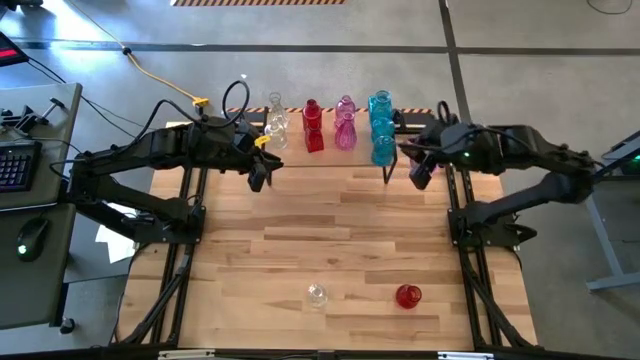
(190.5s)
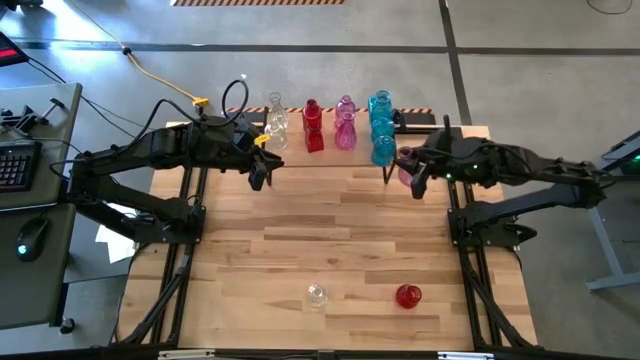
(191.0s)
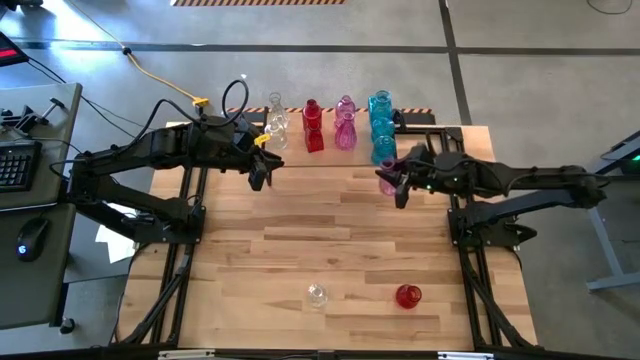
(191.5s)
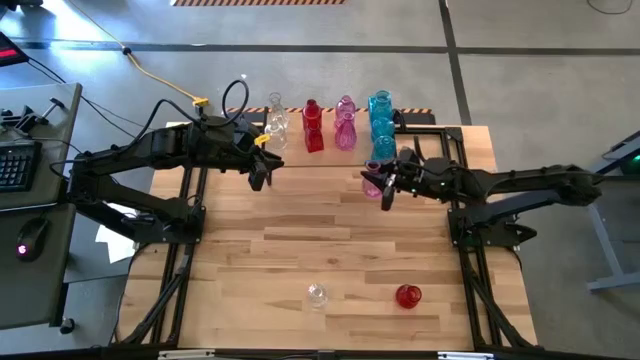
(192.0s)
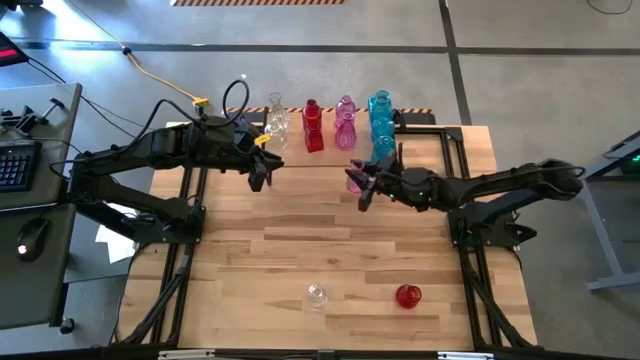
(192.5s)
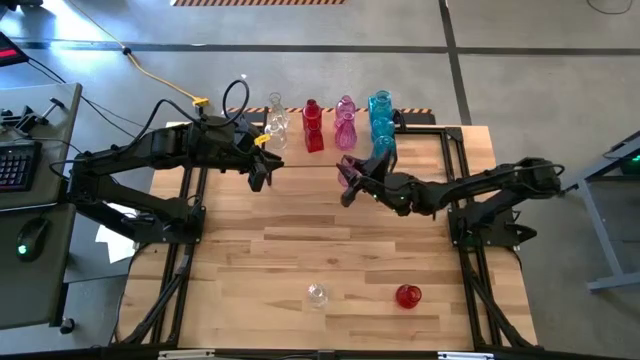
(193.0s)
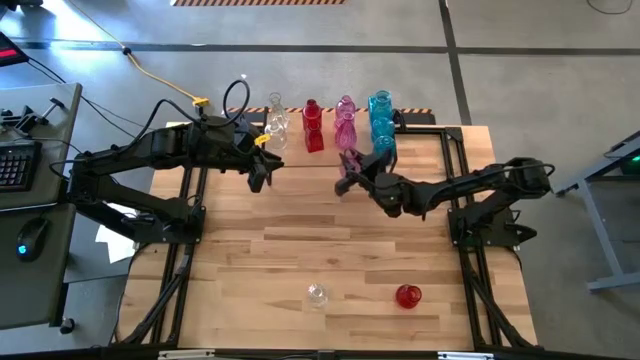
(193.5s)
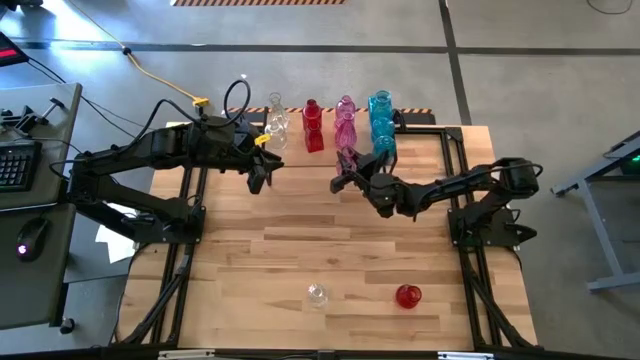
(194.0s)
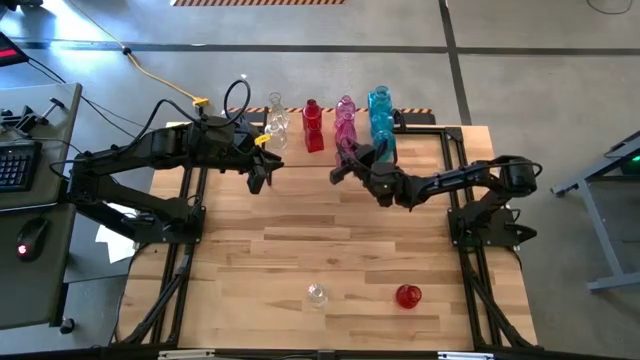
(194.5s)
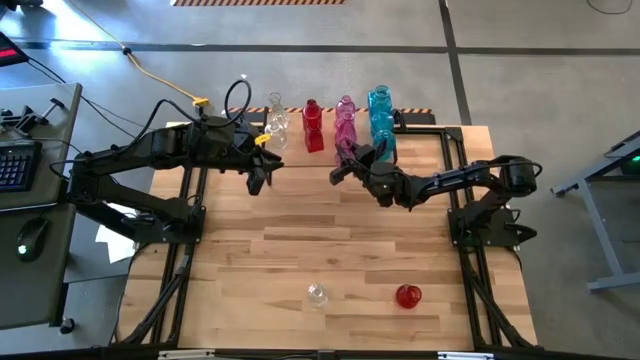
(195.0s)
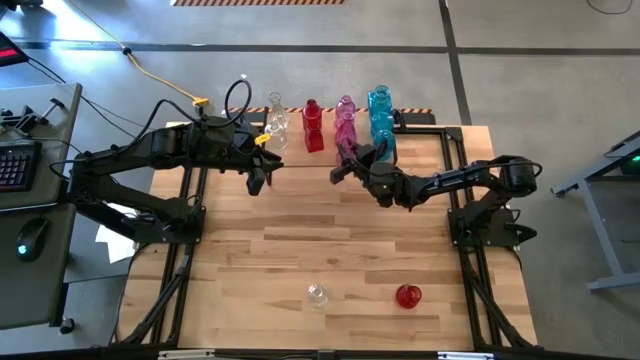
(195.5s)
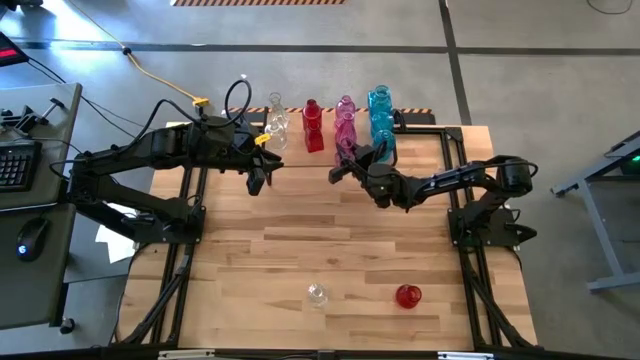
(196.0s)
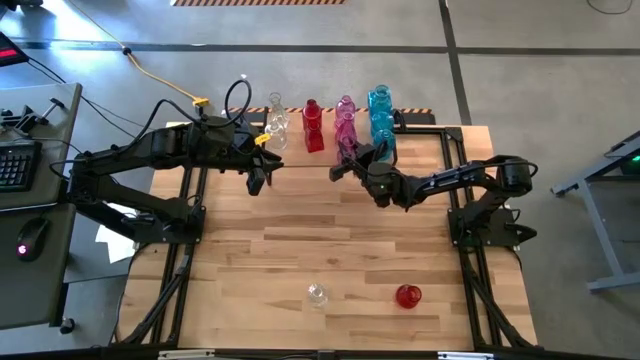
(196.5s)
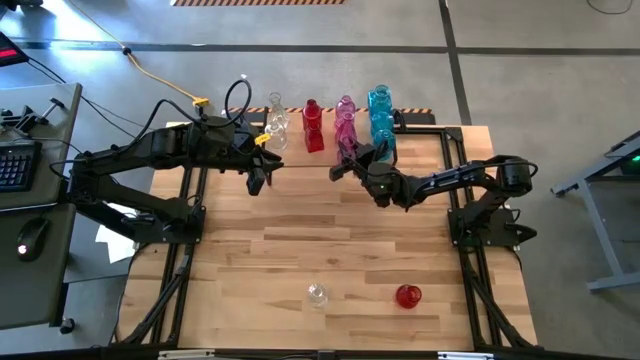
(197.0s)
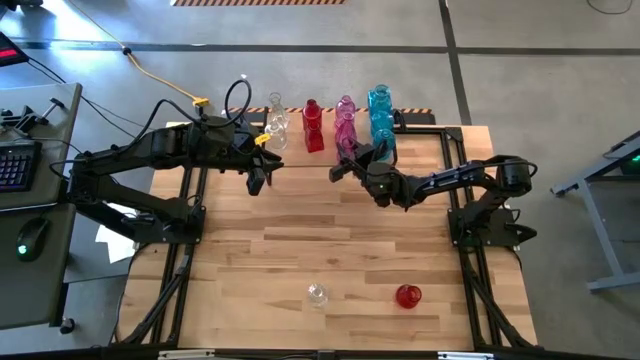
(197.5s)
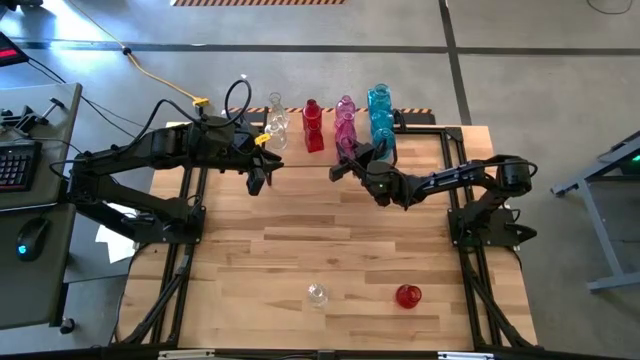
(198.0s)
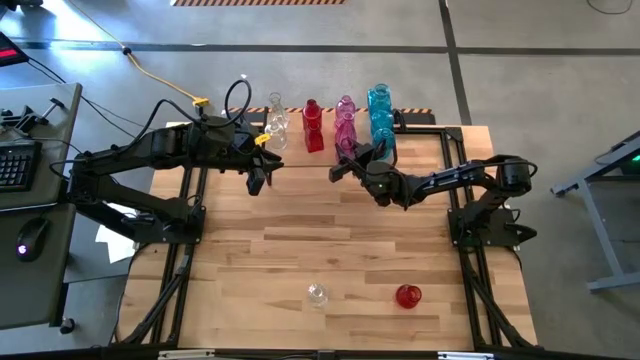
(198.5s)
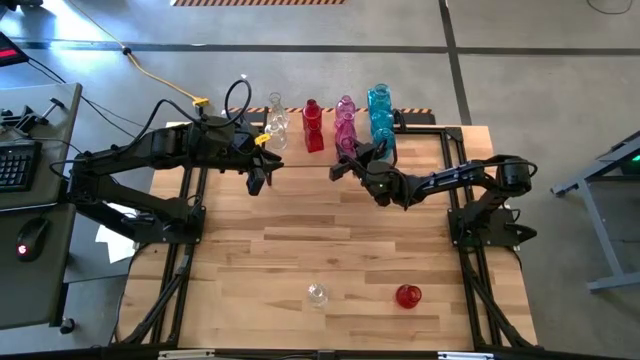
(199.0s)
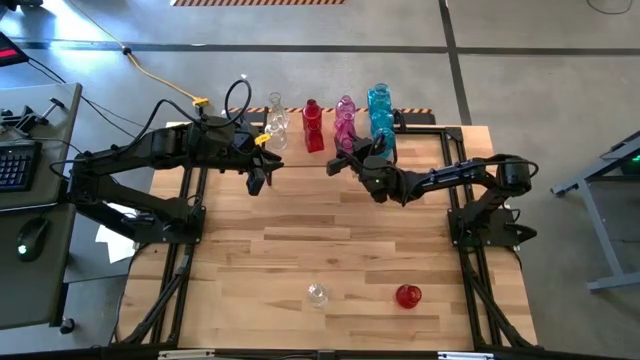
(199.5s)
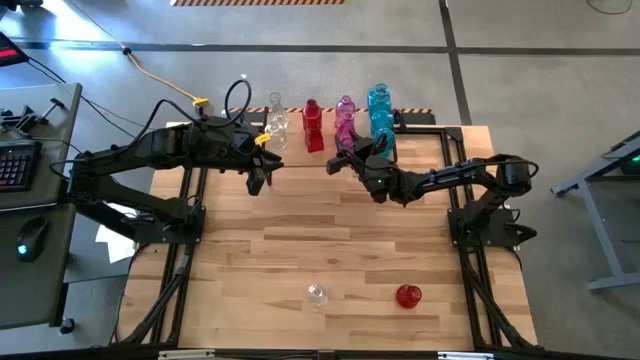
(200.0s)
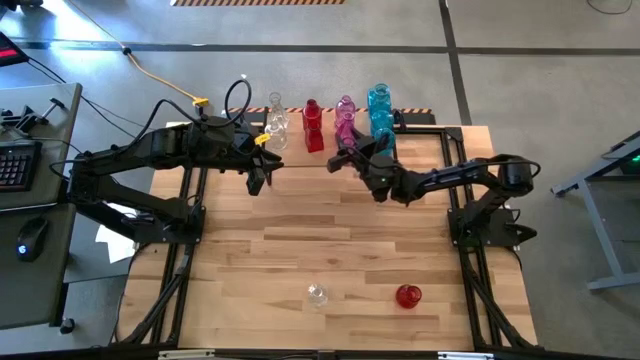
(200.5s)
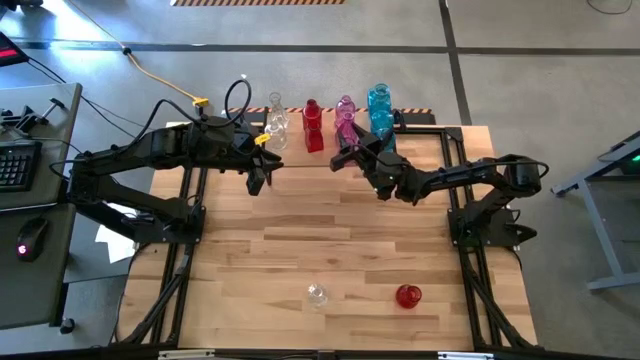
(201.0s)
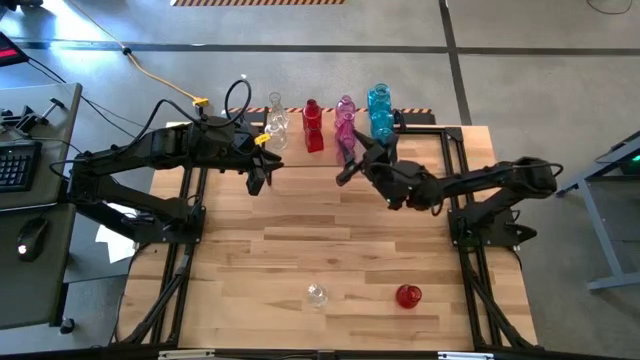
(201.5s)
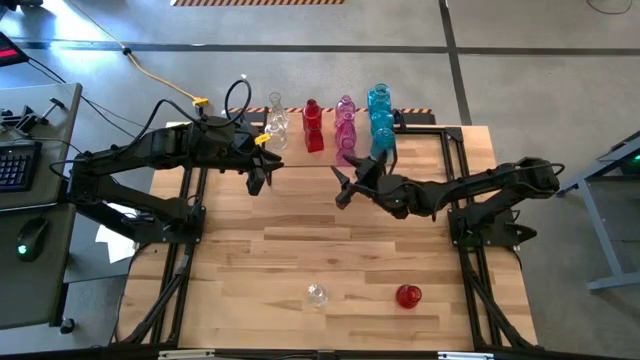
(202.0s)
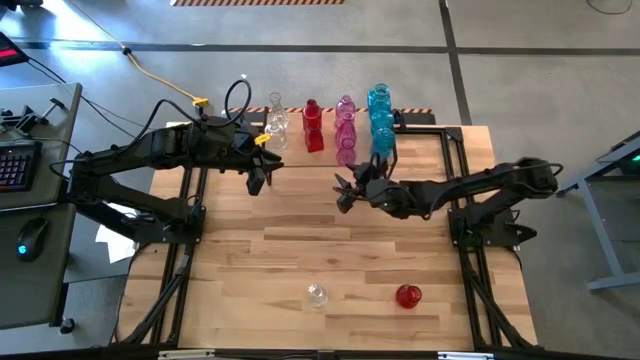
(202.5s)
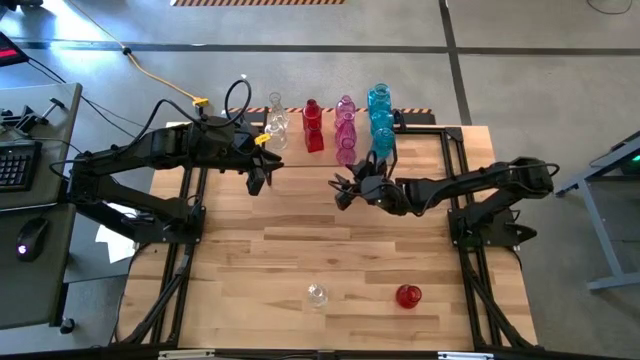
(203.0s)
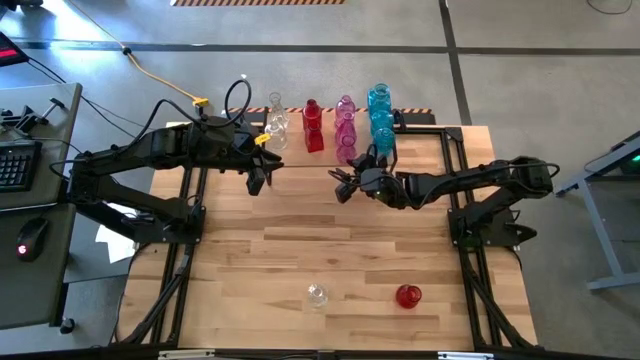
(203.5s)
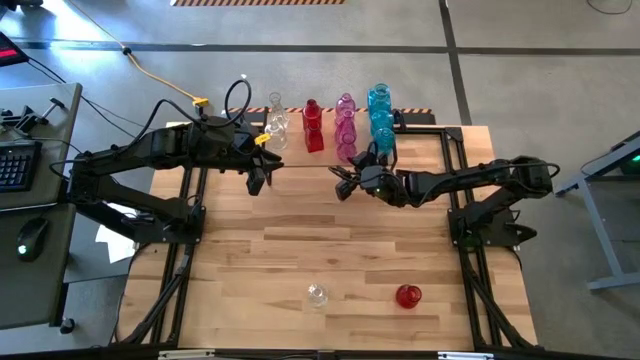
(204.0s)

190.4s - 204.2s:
Task: sort vases onto shelf
Put the pink vase on the shelf aligned with the other pink vases
